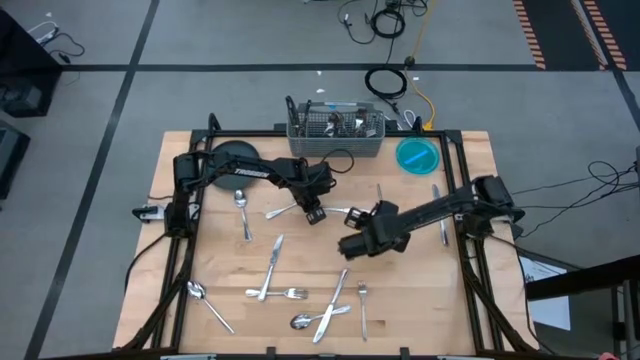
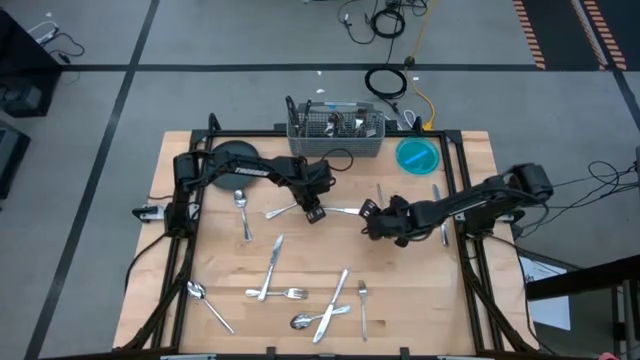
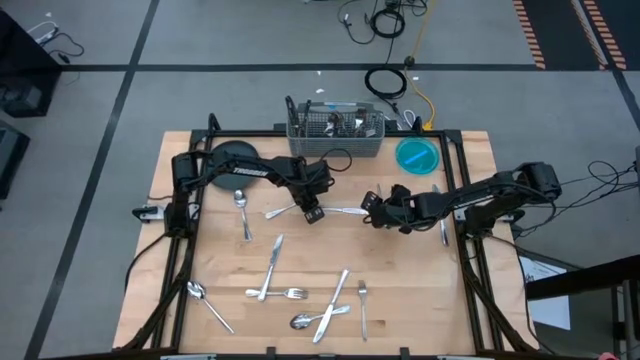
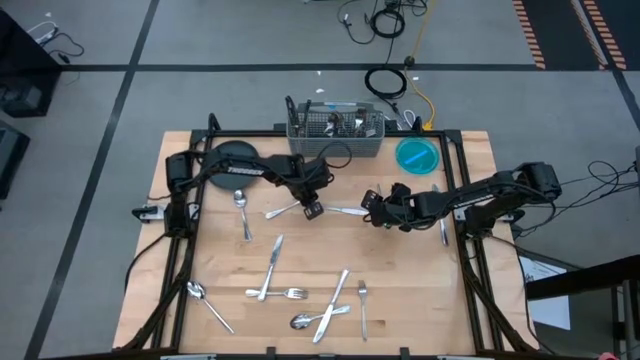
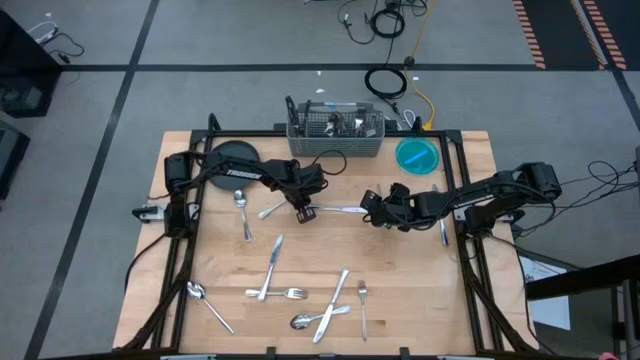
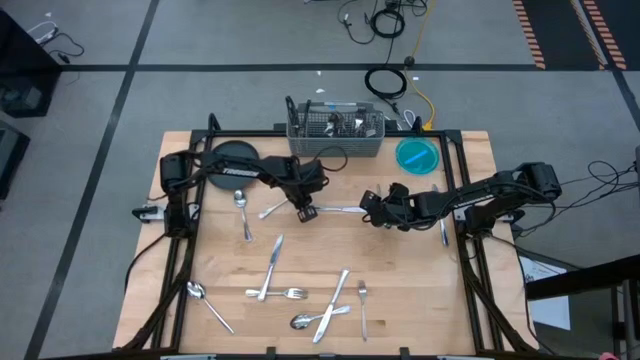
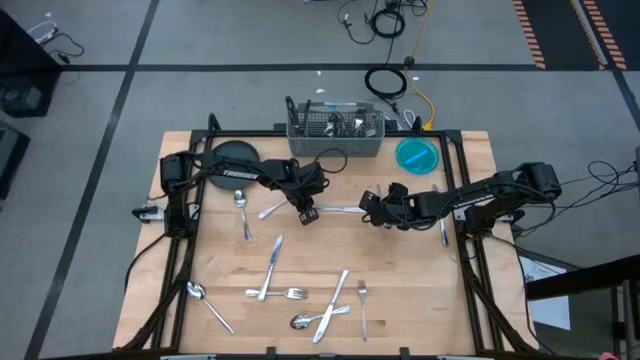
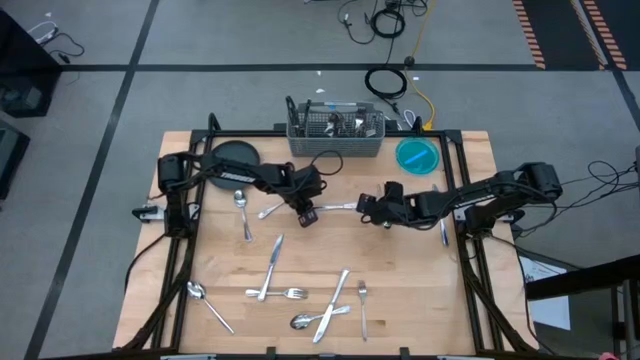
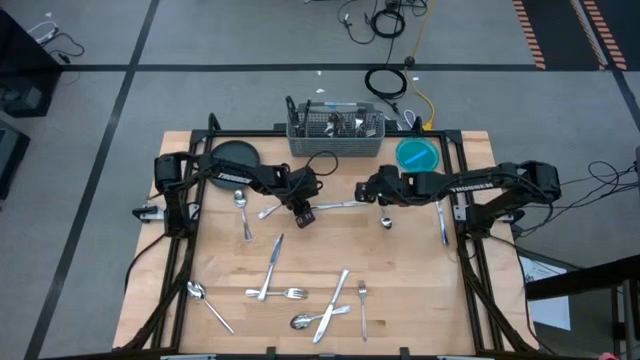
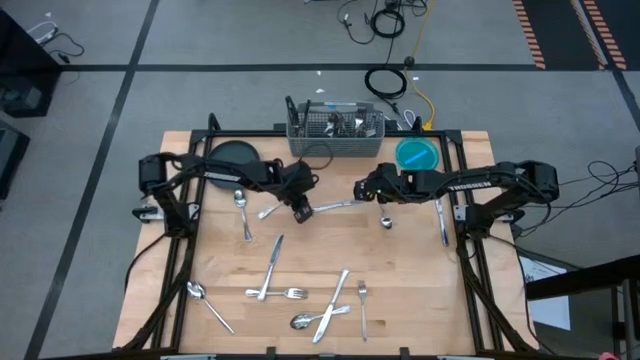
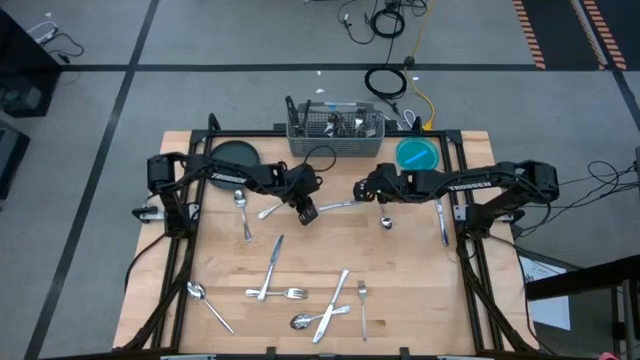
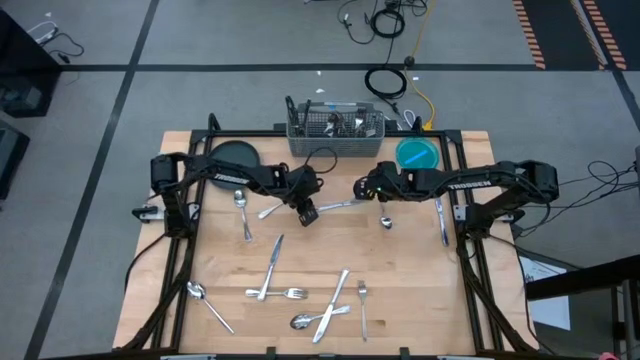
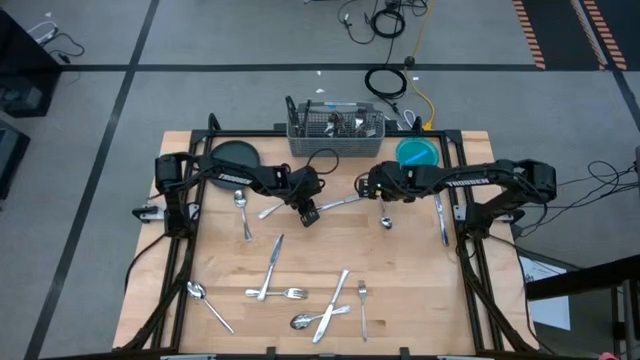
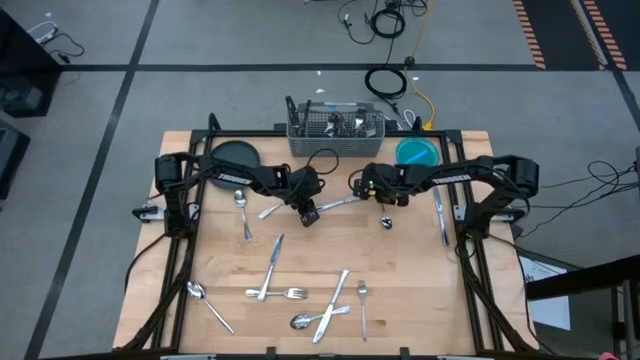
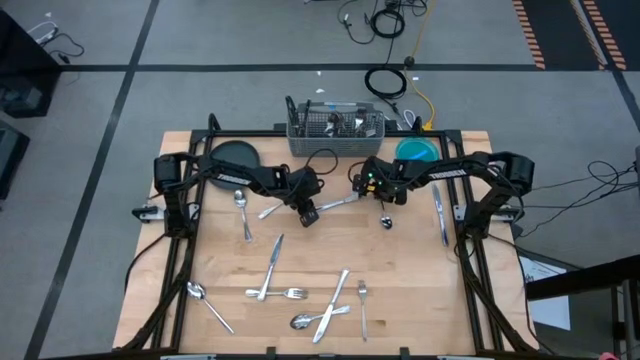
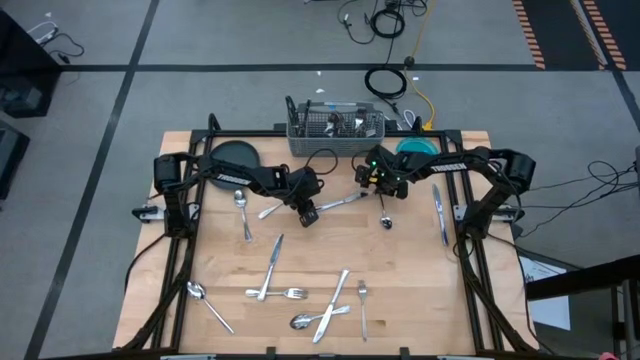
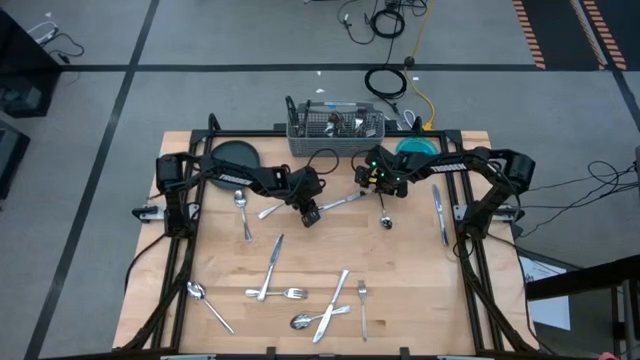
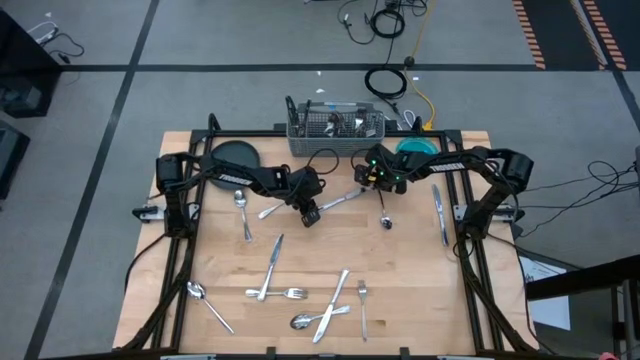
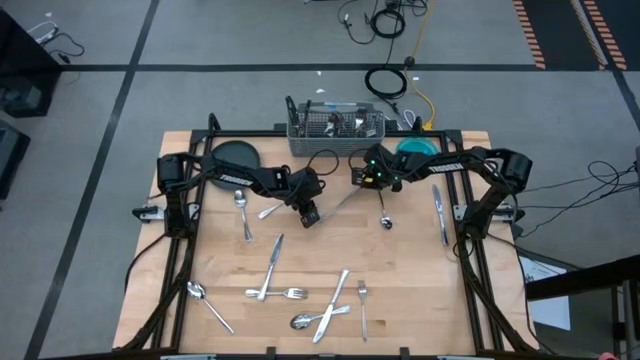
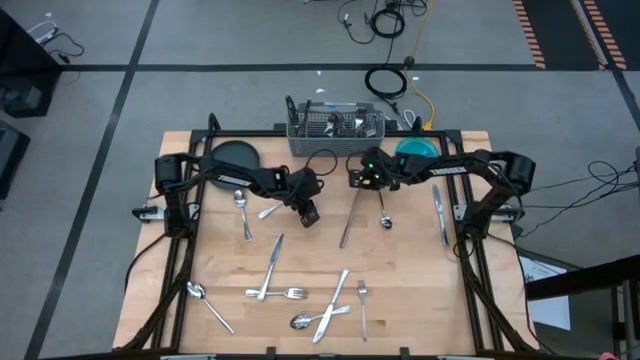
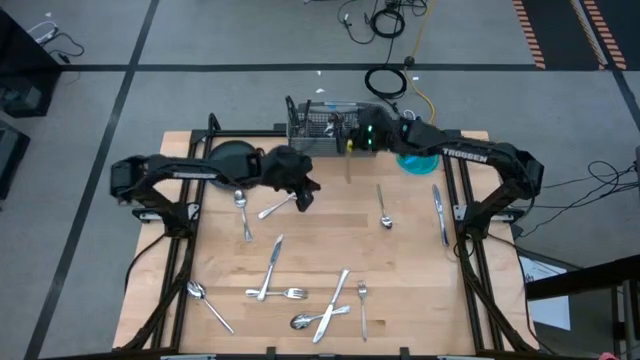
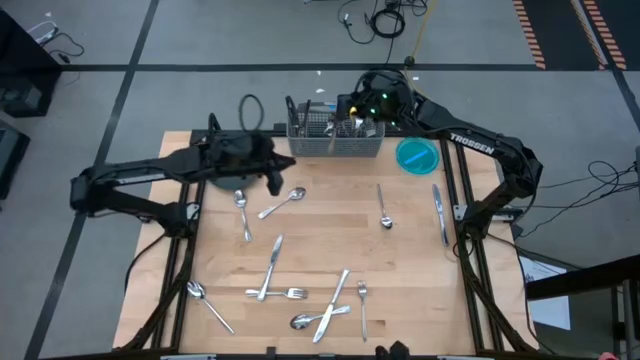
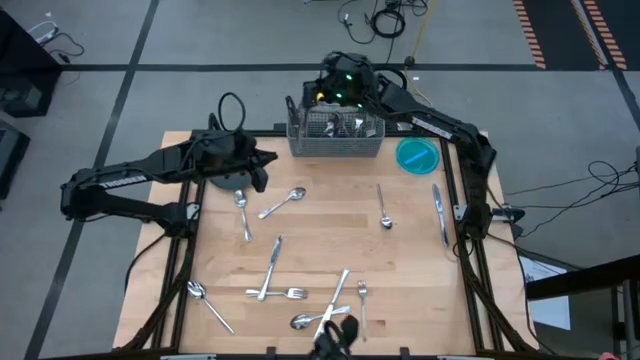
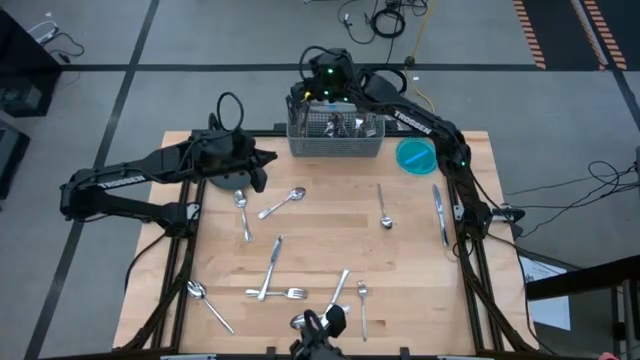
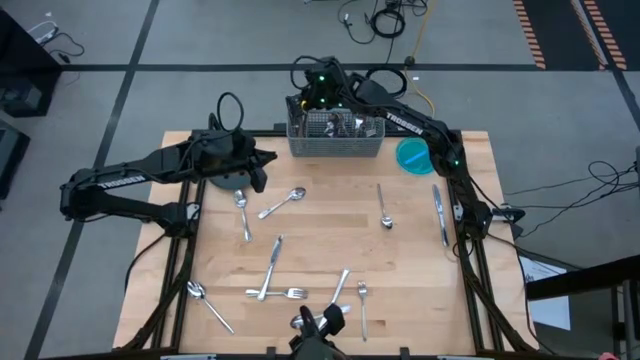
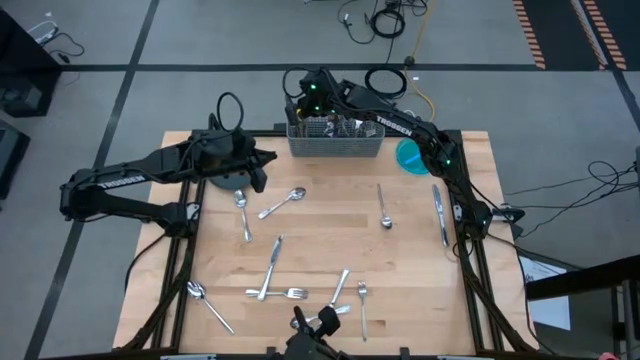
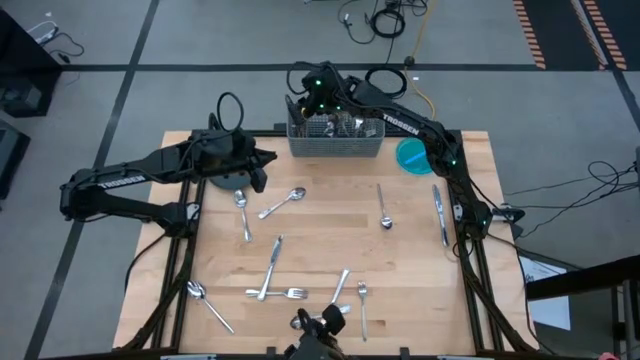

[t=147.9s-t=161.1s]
Task: Sort silverware
Put the table knife into the silverware organizer

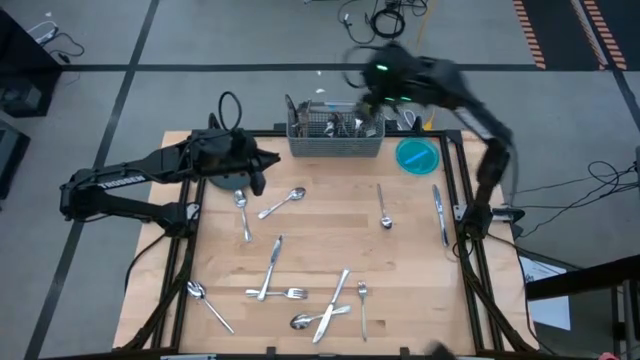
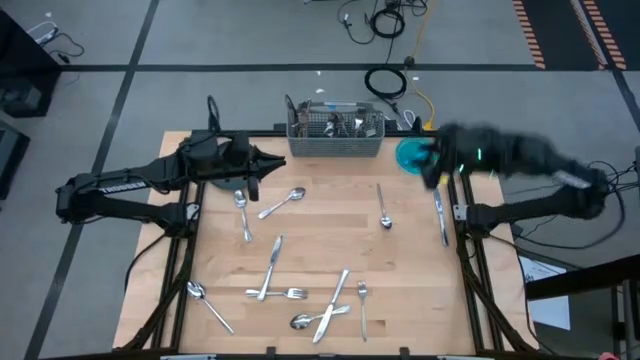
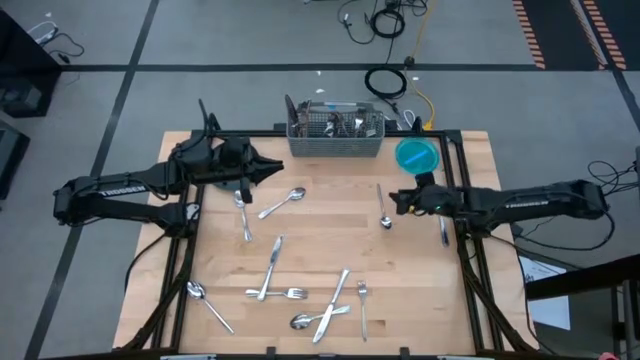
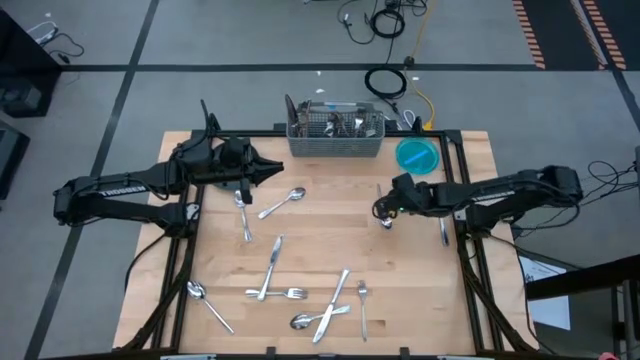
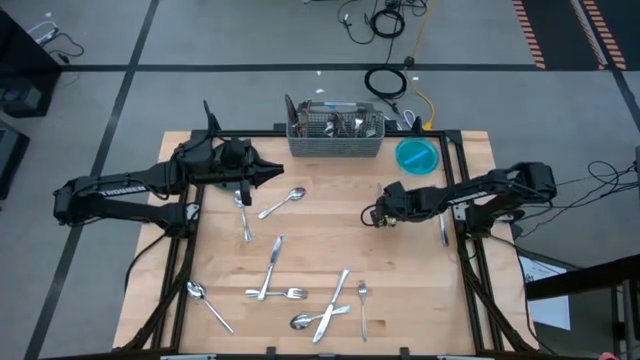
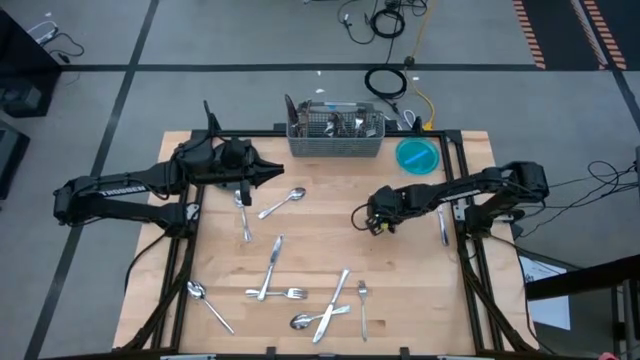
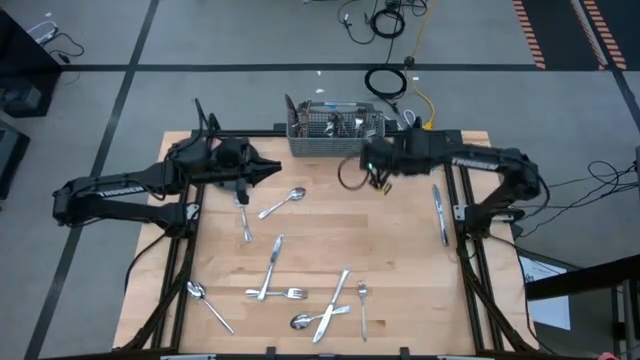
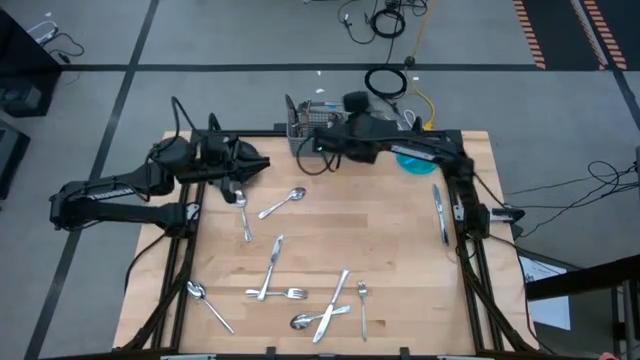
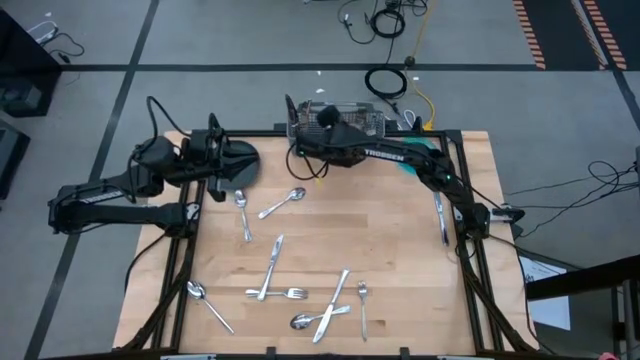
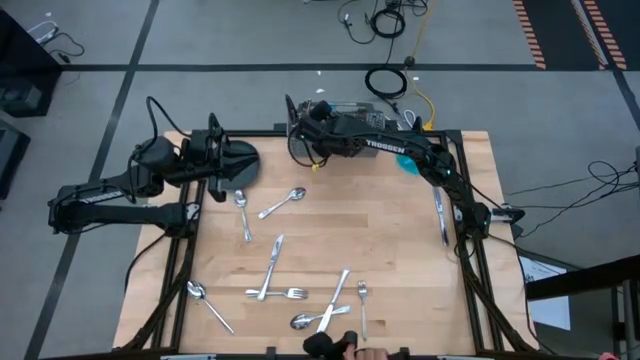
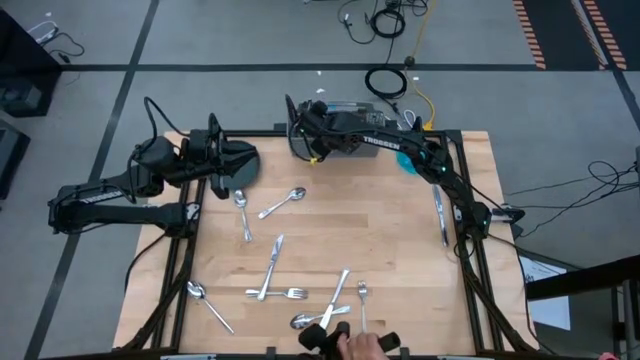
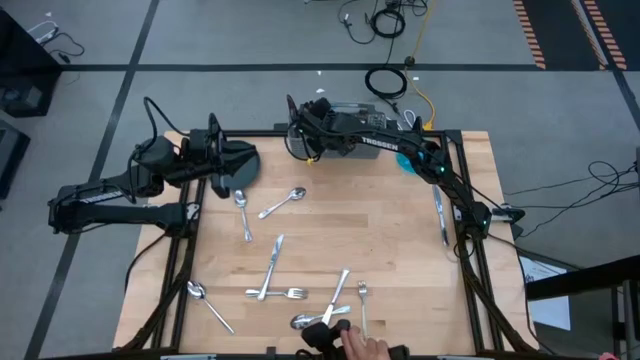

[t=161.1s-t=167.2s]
Put the spoon into the silverware organizer

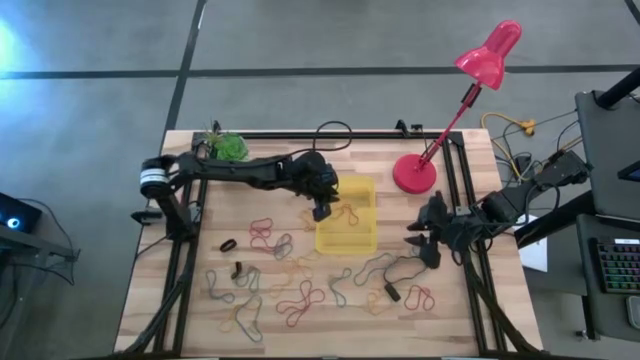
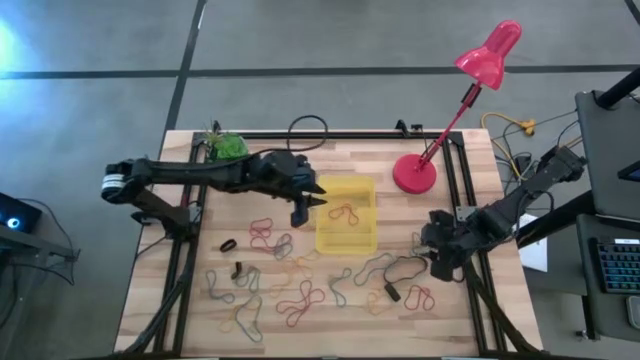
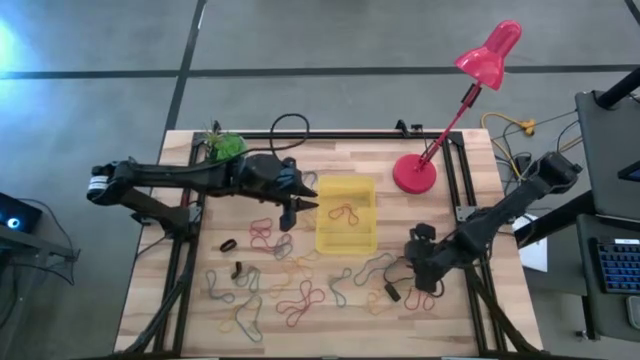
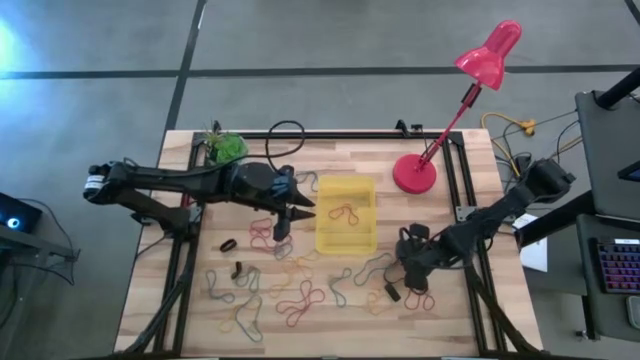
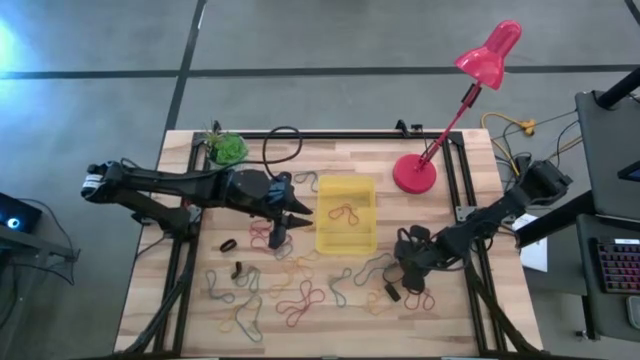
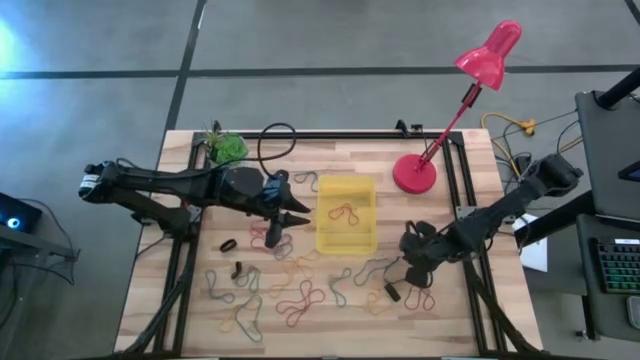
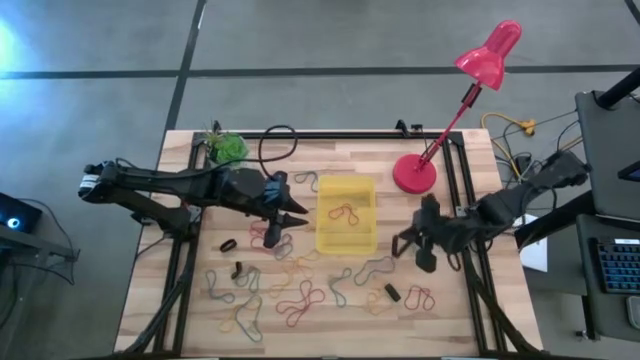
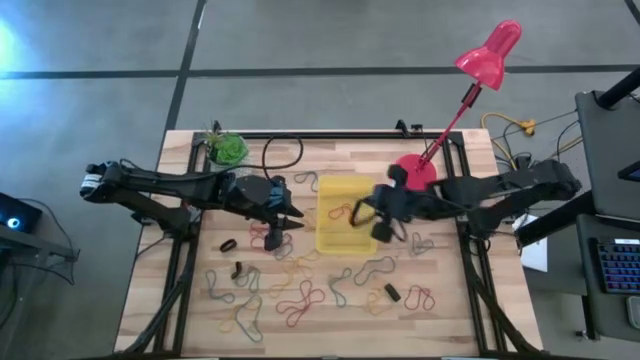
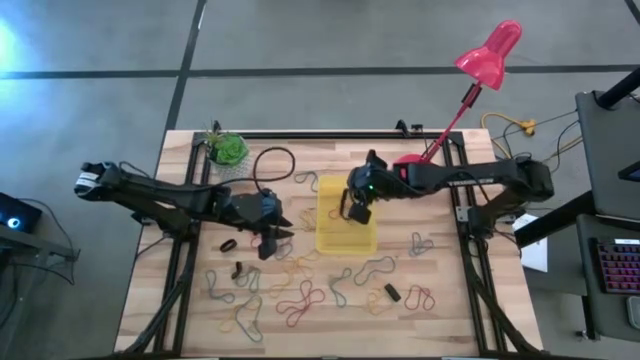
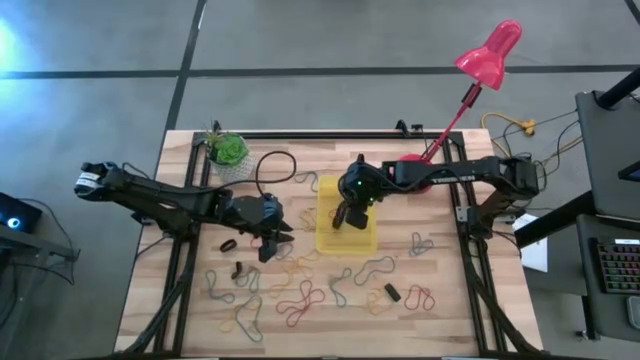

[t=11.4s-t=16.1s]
Task: Pick and place rubber bands into bin
Put the black rubber band into the bin
